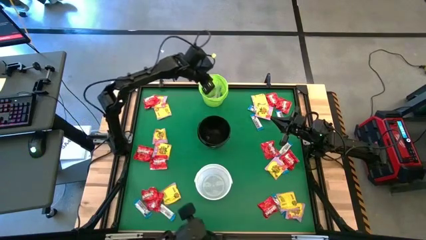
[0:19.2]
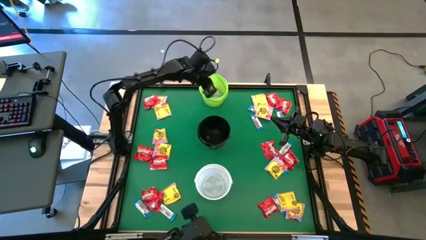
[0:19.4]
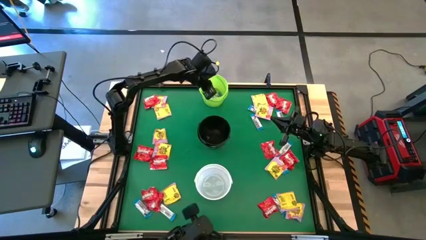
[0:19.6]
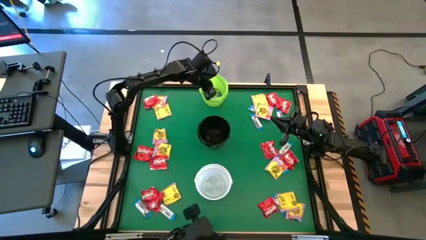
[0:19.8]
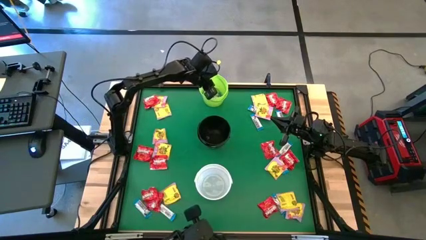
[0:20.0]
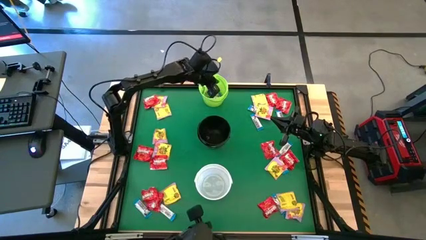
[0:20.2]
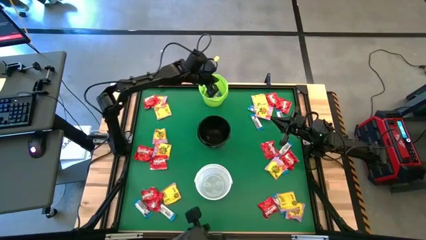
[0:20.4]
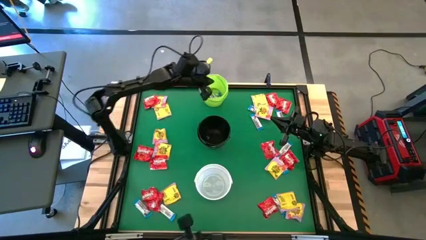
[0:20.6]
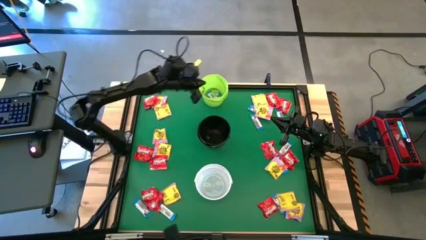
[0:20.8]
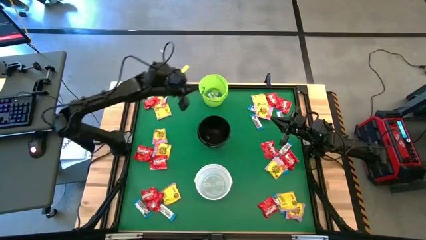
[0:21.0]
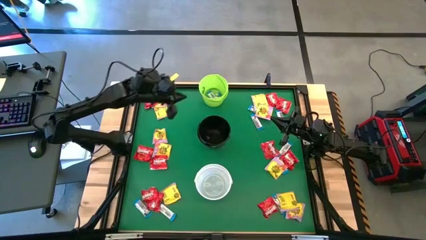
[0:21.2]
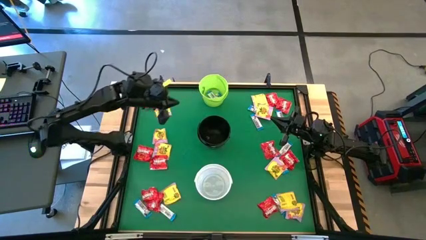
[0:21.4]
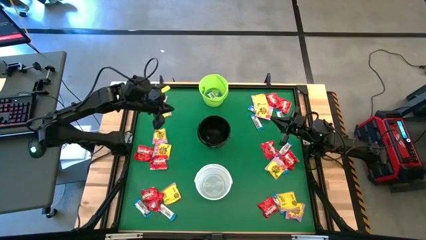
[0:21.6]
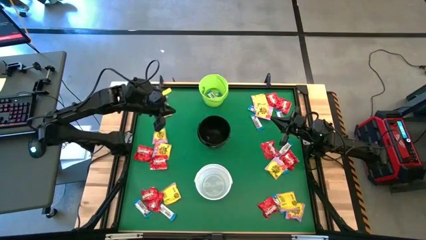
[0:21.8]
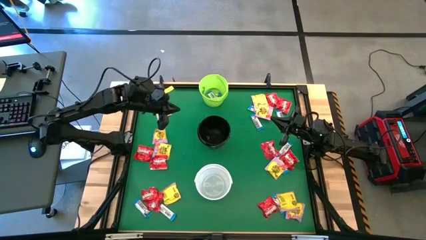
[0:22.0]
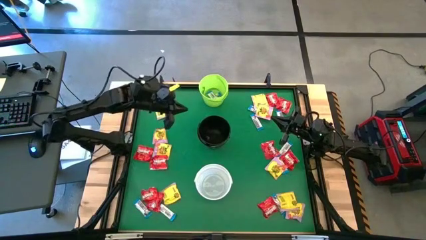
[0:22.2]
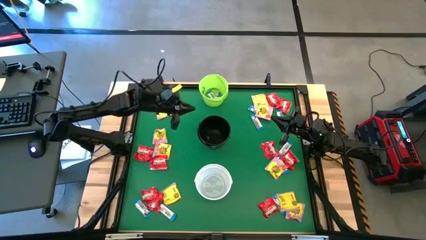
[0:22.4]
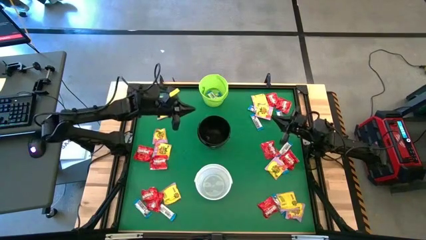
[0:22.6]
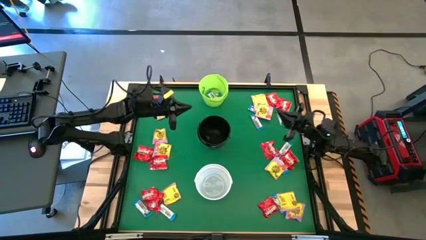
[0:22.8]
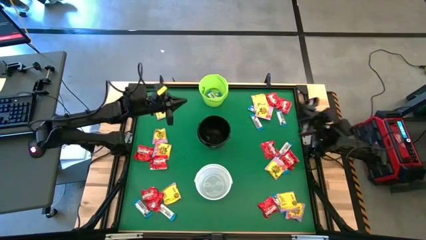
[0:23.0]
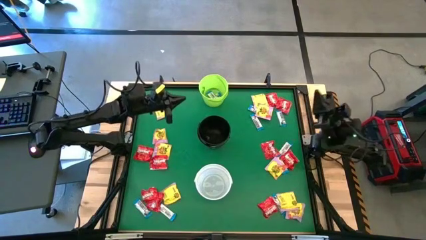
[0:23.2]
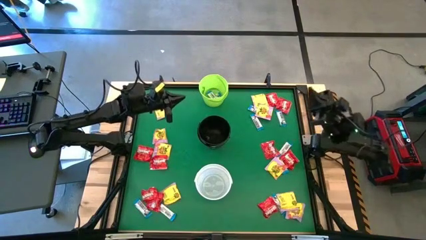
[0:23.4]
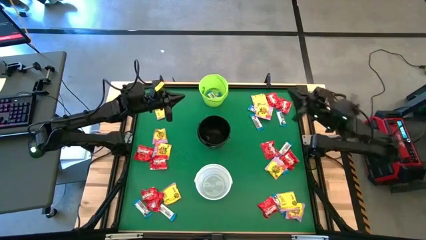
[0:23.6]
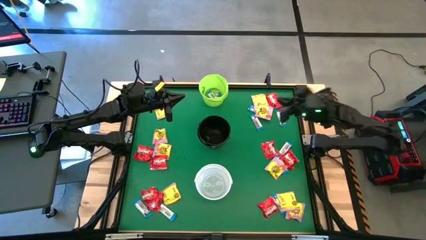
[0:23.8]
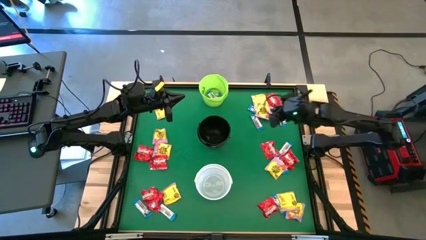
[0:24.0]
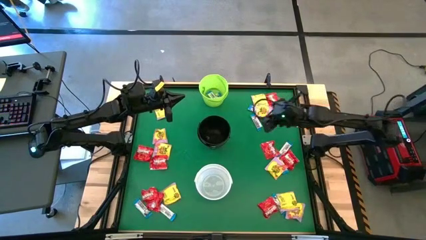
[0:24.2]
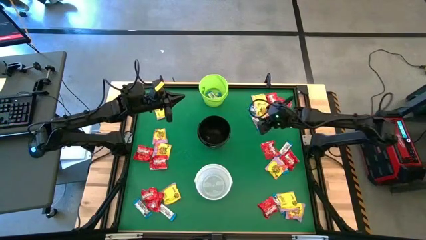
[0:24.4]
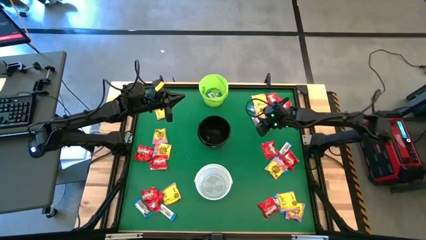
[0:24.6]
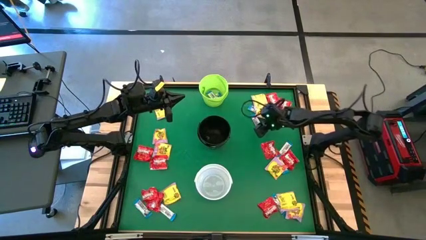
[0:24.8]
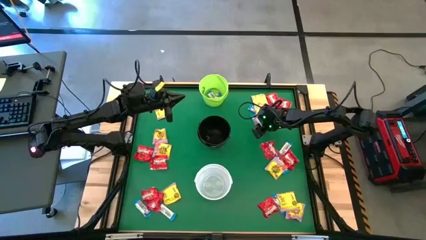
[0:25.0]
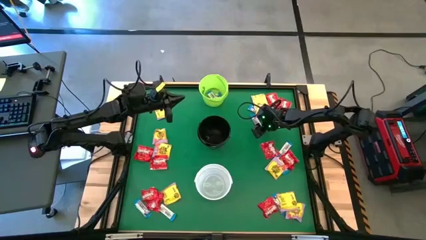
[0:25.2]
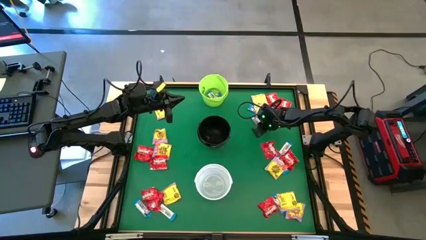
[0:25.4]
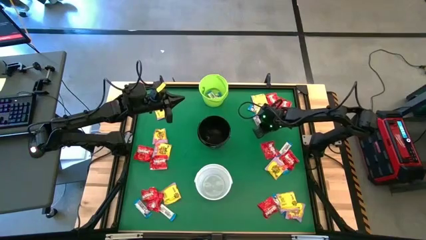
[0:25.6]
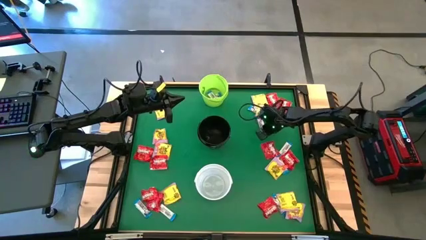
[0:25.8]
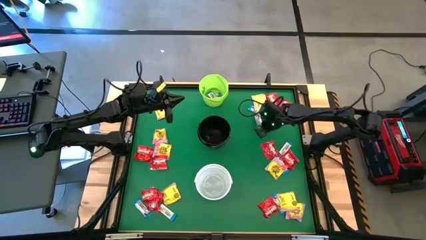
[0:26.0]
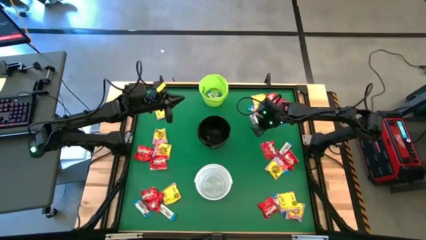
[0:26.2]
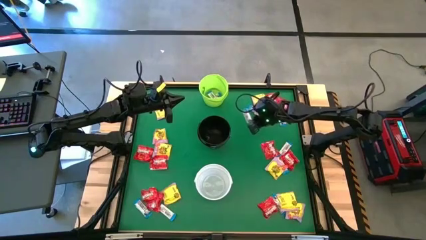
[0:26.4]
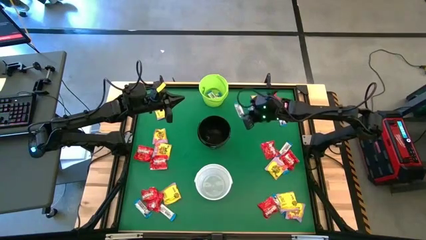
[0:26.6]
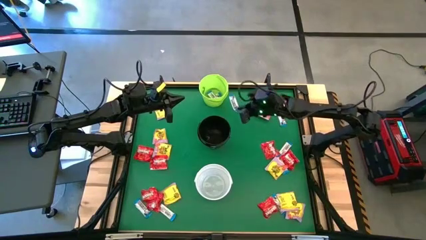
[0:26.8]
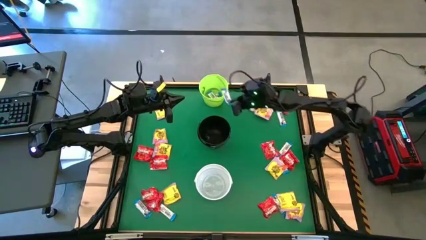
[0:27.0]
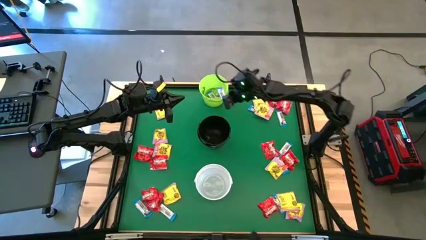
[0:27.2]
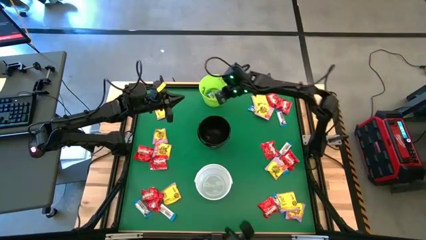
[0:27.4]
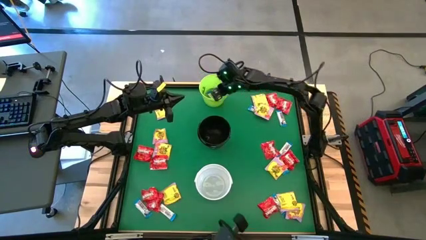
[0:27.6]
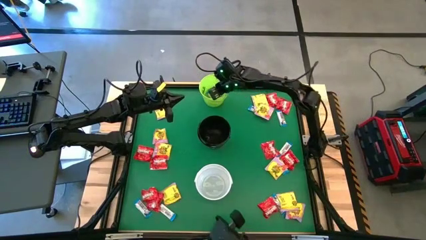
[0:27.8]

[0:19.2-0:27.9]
Task: Sort candy by brand, put in halloween buckets
Put the white chocolate into the green bucket

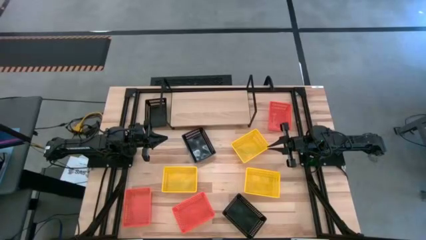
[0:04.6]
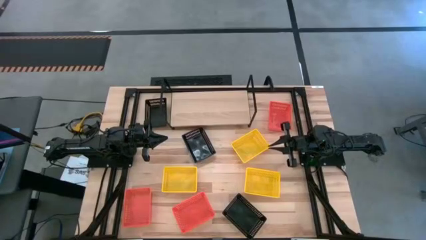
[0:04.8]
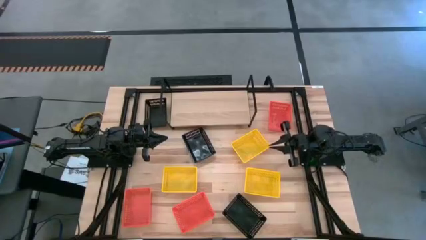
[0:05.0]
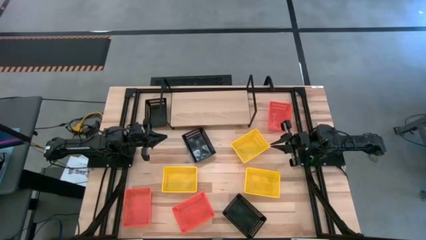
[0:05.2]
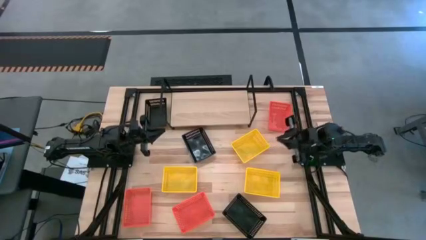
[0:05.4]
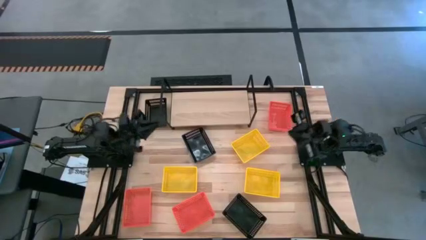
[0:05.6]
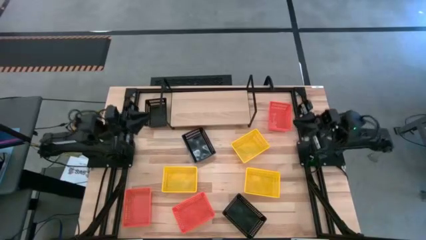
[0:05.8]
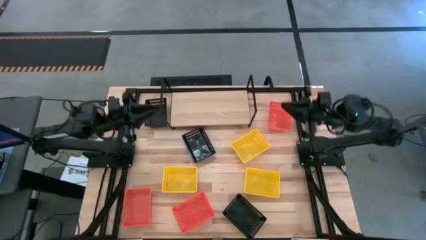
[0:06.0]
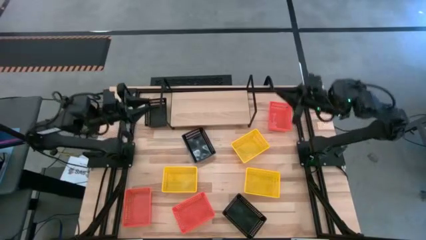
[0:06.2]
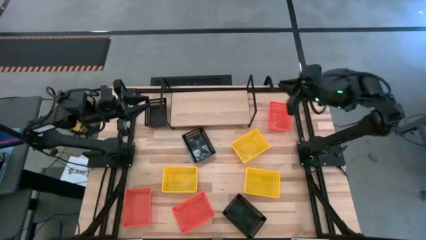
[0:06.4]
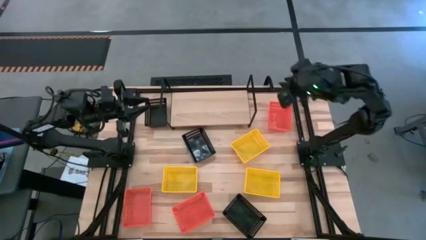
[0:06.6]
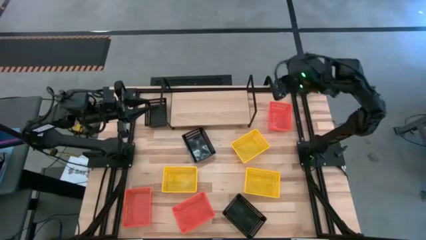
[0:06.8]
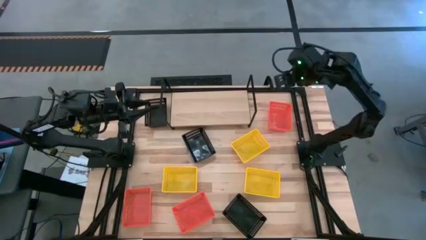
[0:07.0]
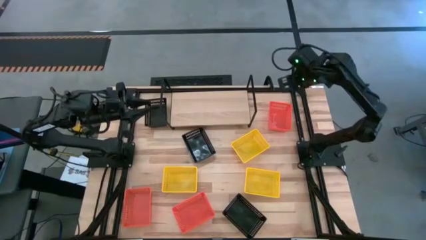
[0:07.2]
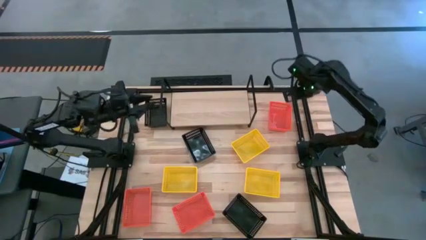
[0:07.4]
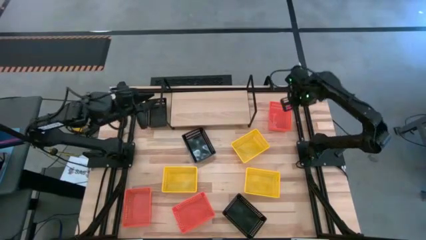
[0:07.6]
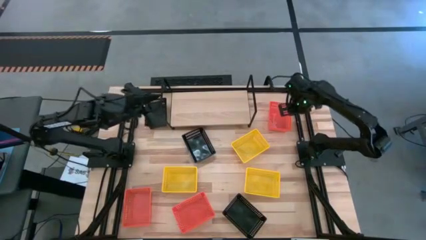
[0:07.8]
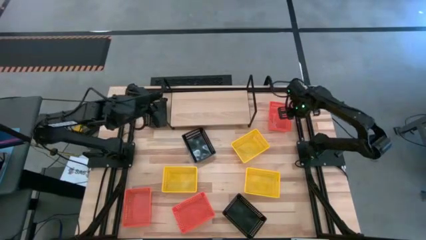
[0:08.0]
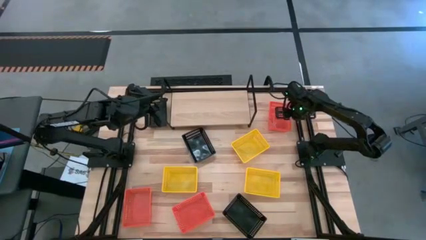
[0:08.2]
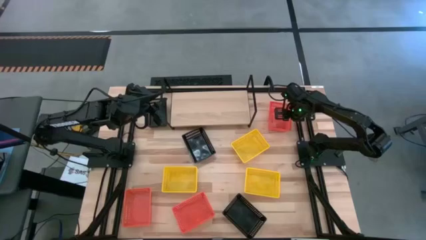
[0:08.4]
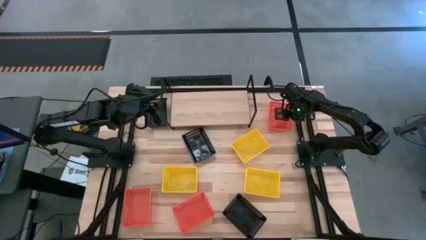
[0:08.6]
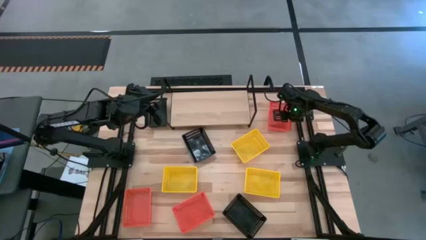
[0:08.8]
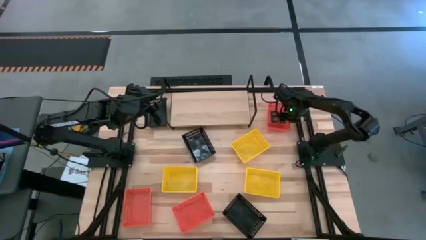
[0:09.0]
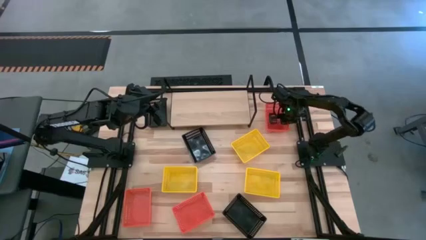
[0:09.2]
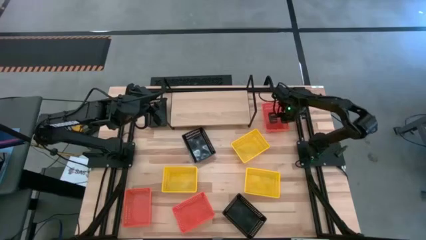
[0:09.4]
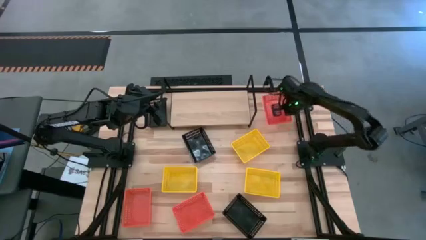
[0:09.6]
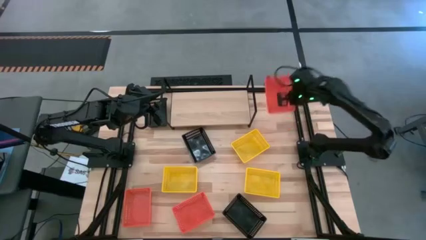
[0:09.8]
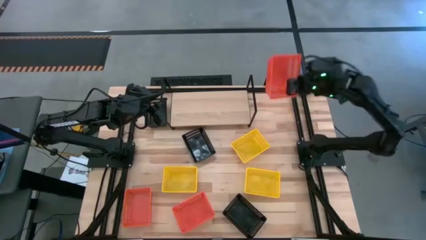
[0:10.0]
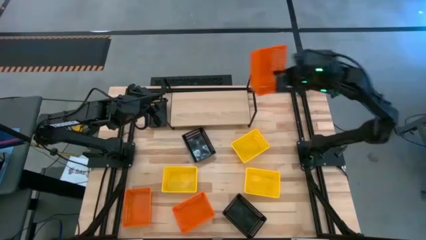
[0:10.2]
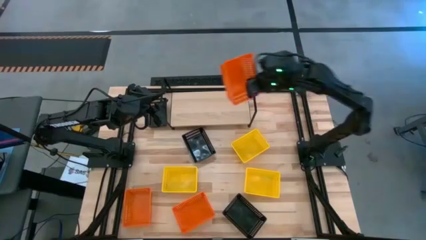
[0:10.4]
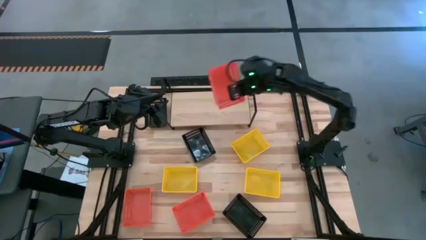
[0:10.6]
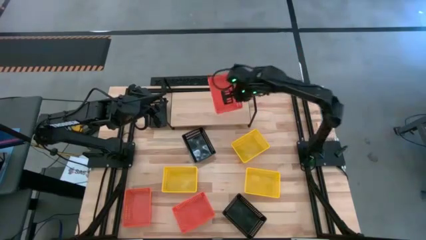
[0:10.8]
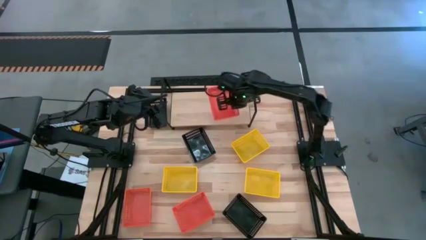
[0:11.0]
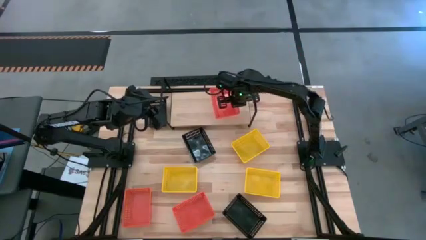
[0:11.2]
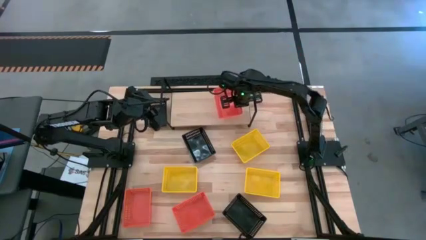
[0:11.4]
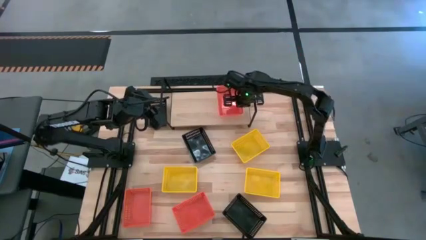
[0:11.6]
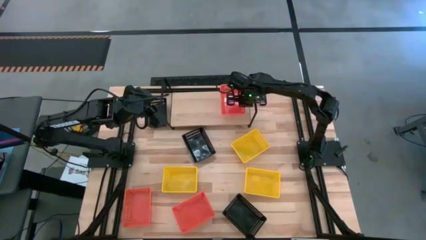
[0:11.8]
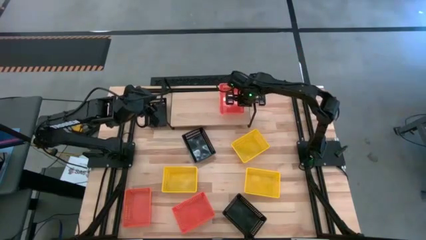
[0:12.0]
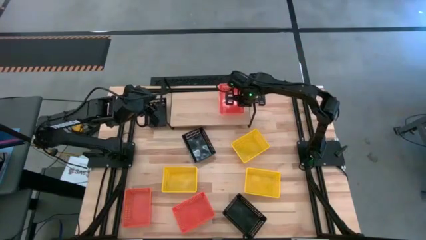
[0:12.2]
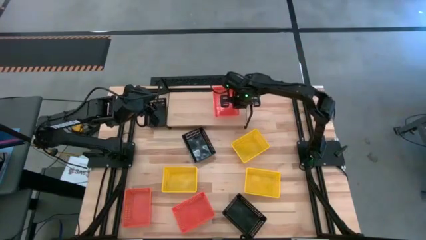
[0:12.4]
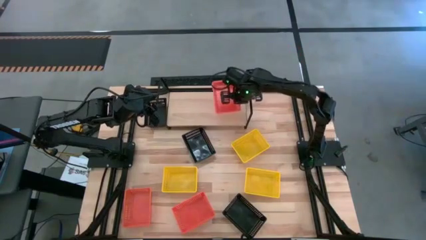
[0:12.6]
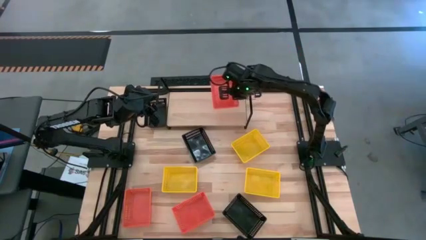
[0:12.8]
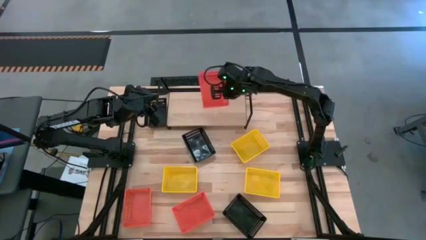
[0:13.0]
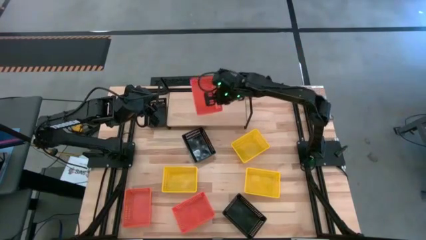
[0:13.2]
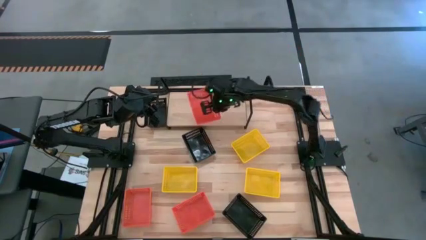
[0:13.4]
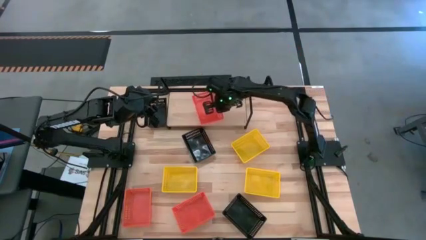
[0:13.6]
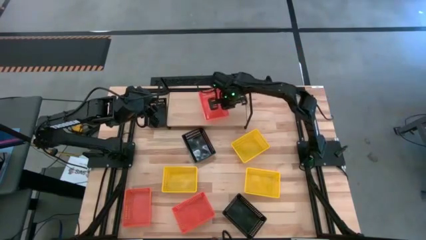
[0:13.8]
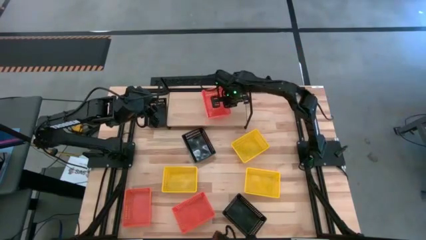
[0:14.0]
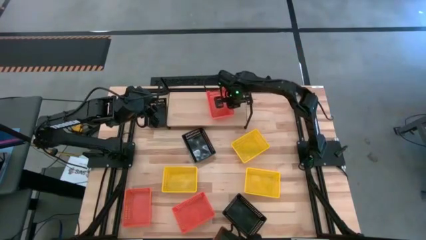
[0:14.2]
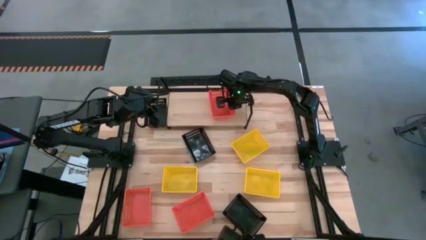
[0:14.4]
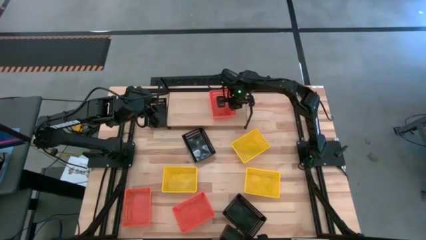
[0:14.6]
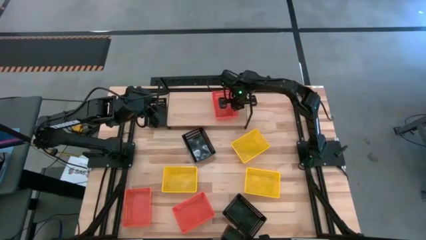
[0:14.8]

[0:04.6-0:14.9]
Task: Stack baskets on shelf by color
Put the top orange bin on the shelf
